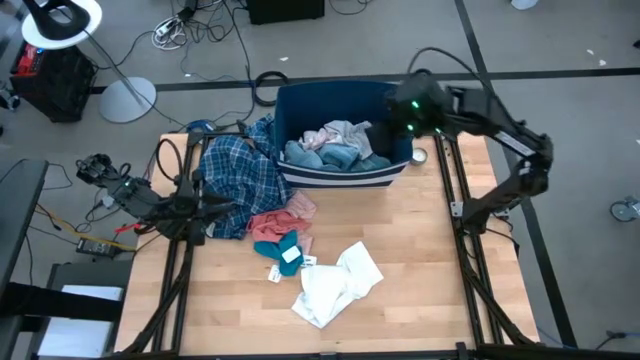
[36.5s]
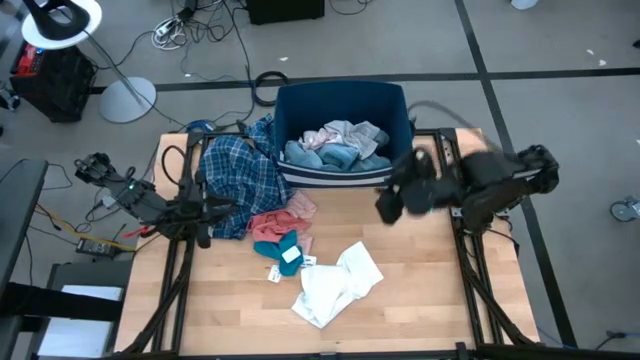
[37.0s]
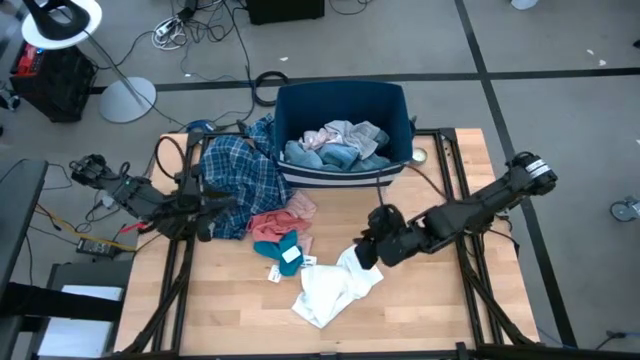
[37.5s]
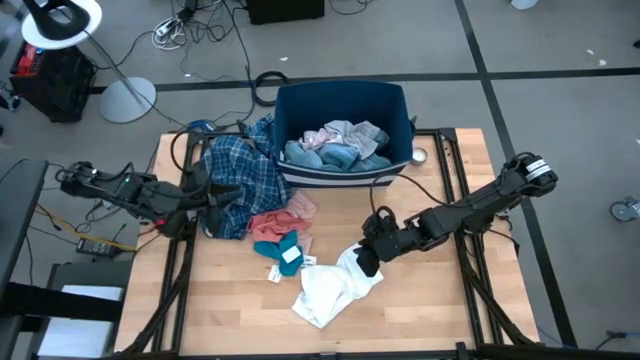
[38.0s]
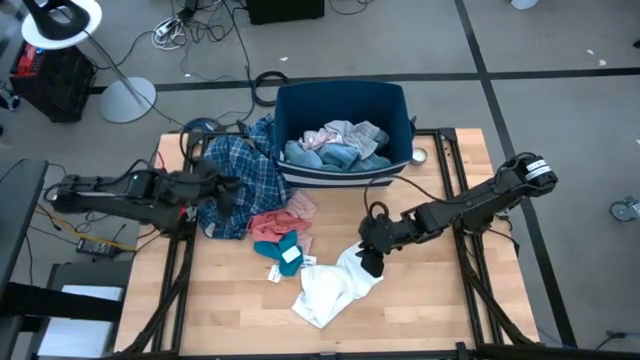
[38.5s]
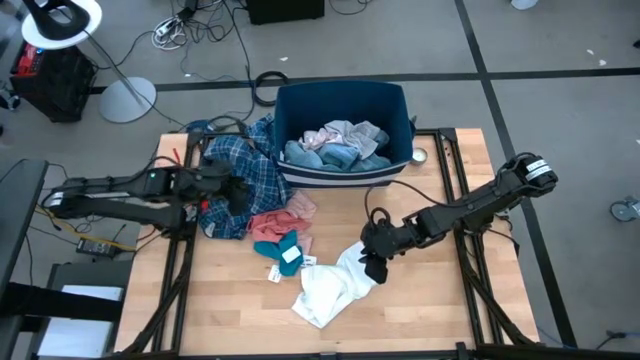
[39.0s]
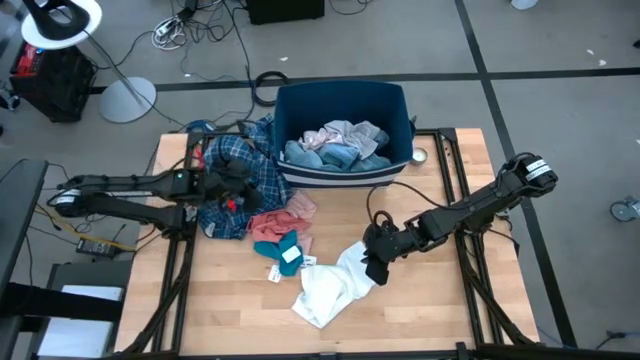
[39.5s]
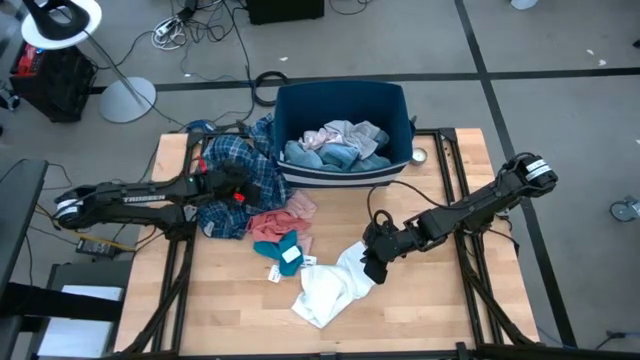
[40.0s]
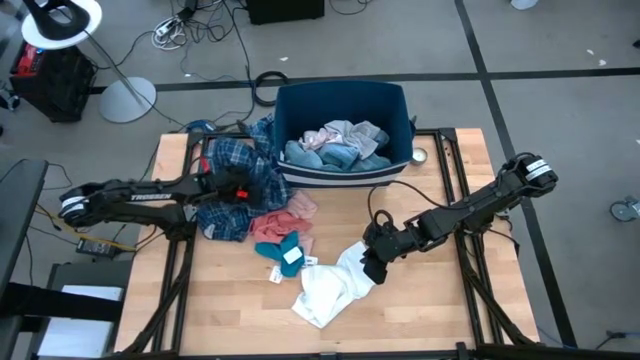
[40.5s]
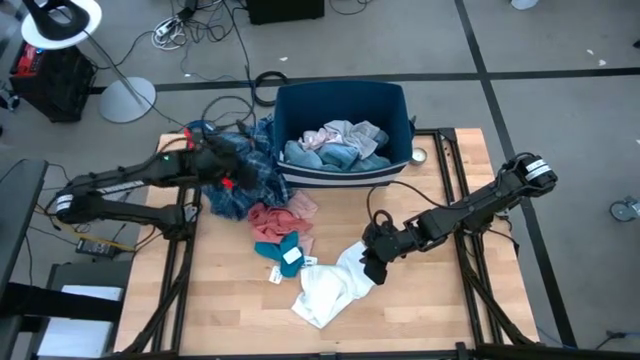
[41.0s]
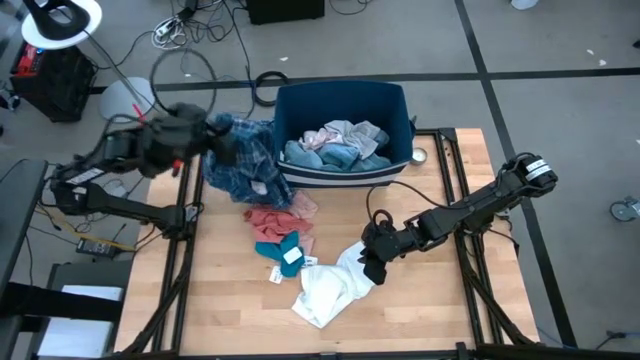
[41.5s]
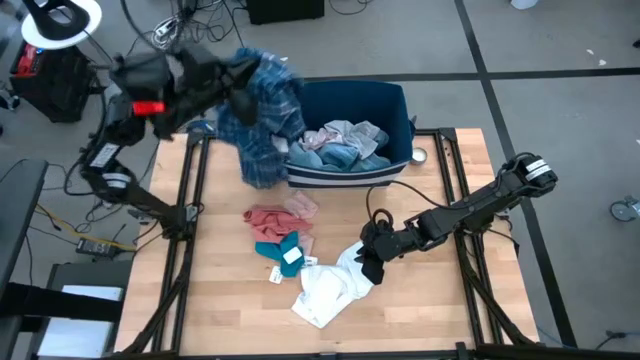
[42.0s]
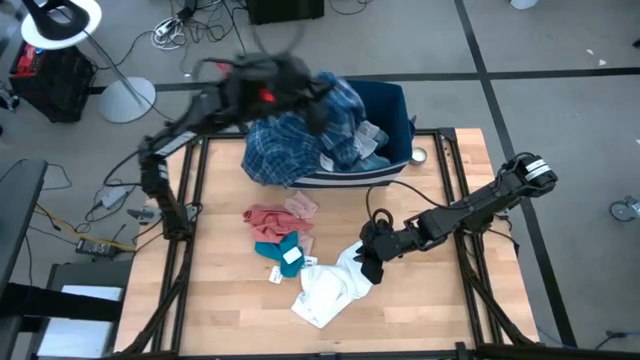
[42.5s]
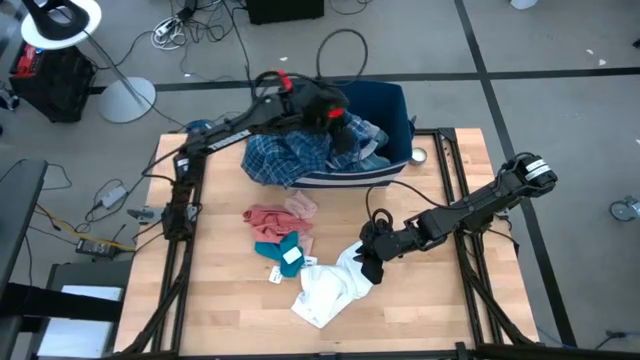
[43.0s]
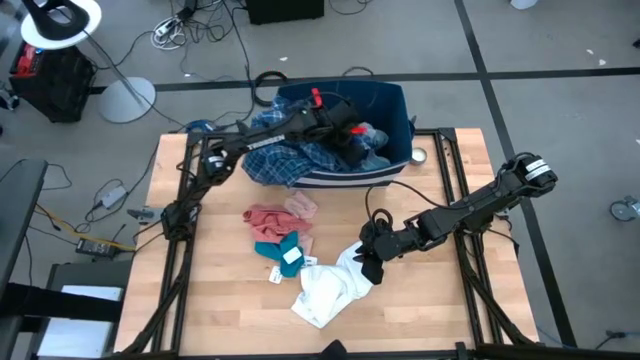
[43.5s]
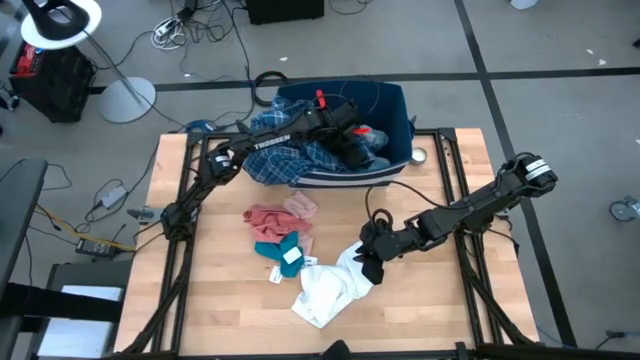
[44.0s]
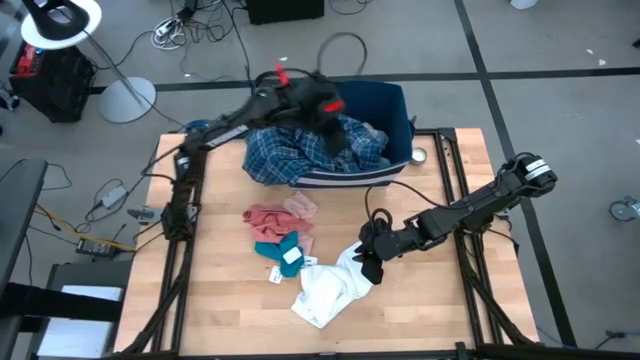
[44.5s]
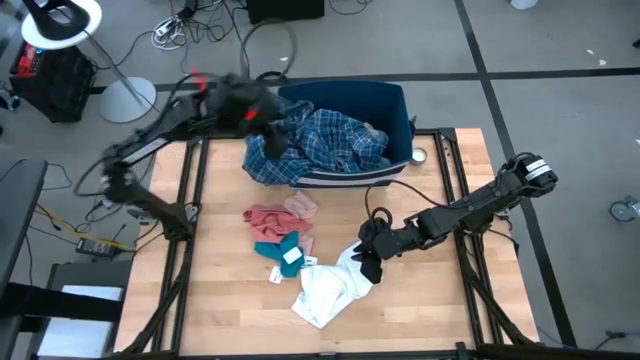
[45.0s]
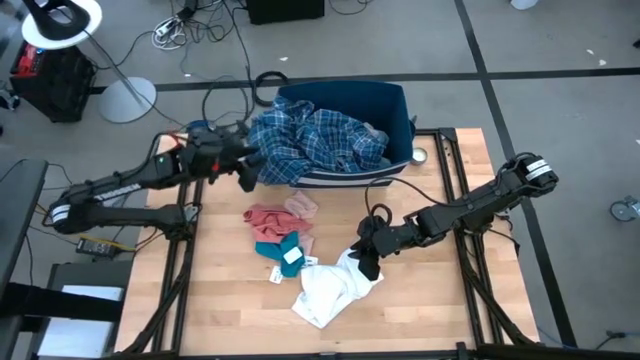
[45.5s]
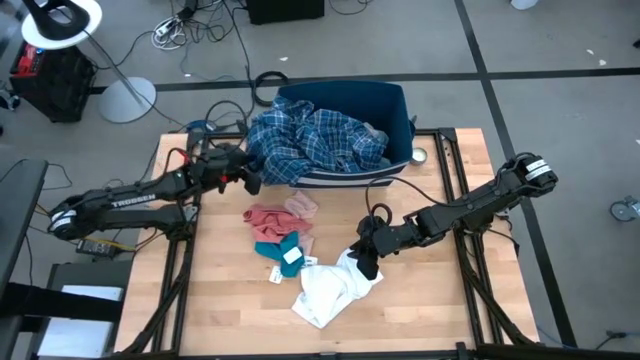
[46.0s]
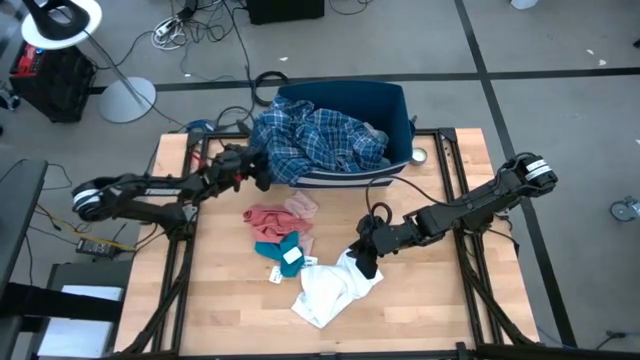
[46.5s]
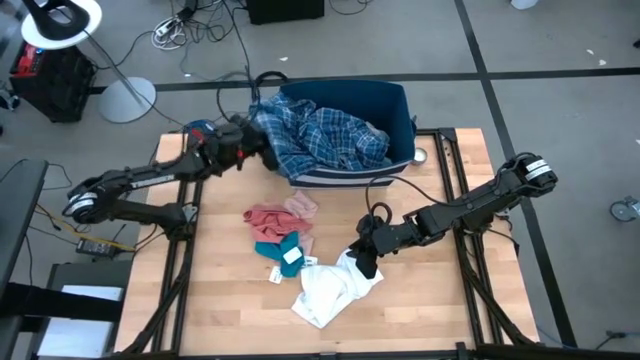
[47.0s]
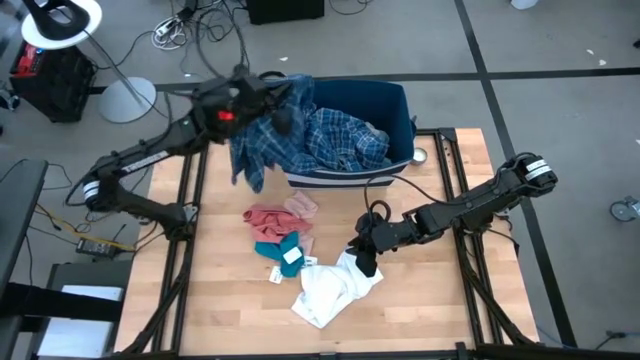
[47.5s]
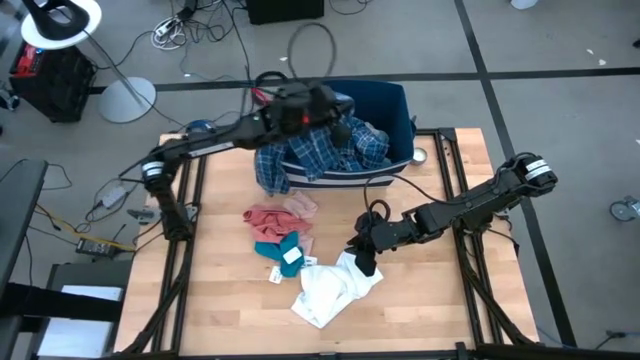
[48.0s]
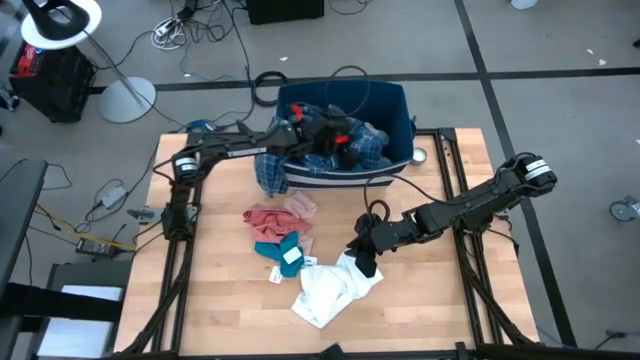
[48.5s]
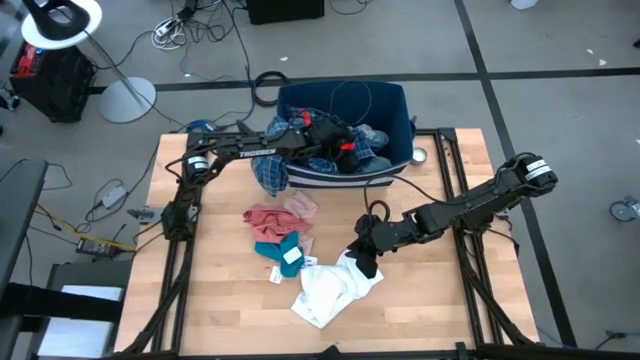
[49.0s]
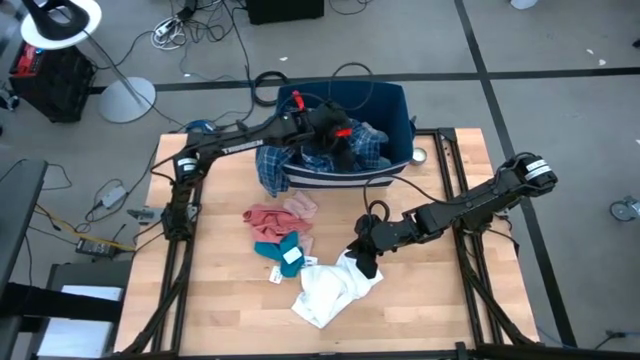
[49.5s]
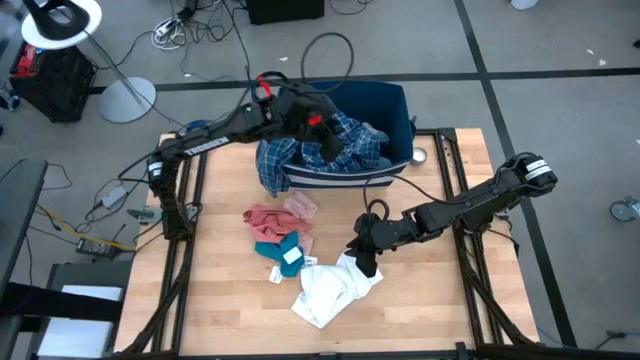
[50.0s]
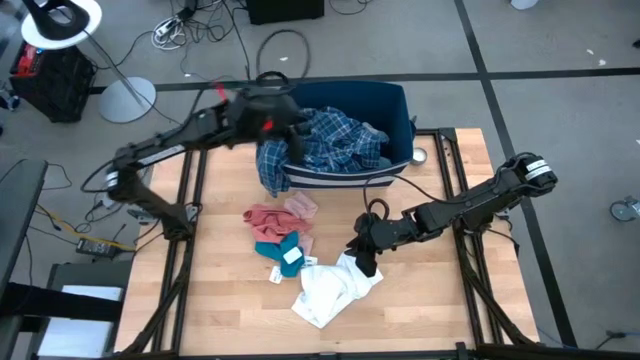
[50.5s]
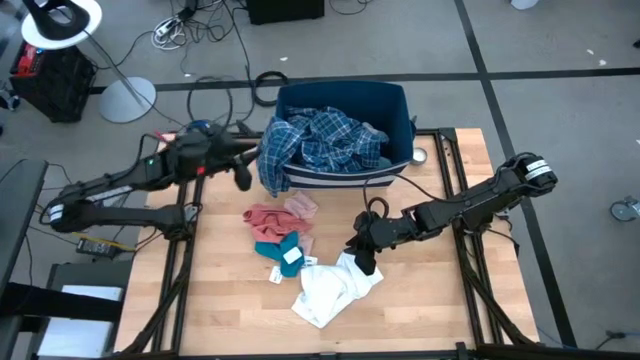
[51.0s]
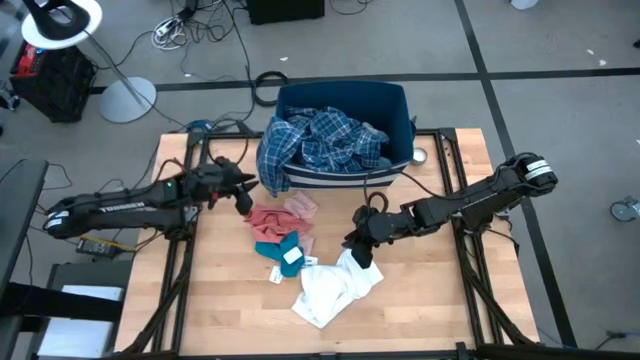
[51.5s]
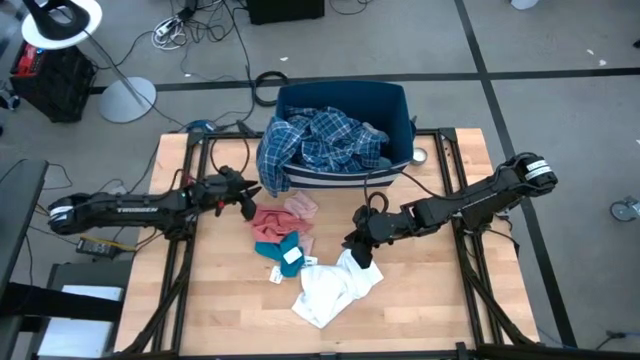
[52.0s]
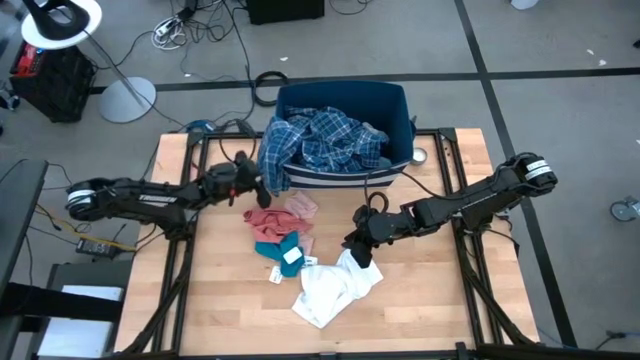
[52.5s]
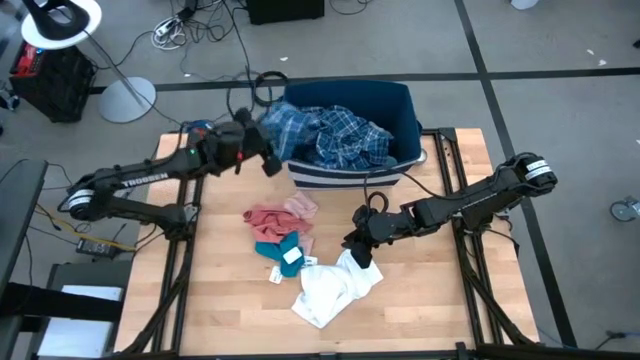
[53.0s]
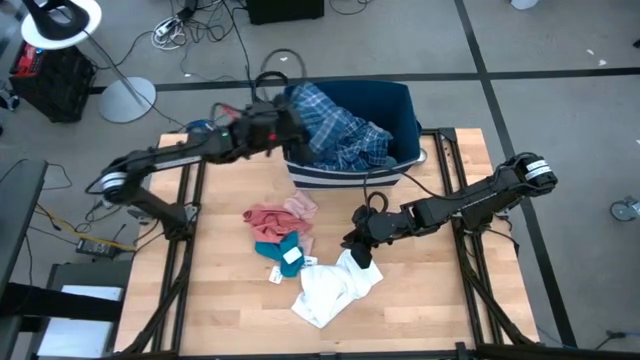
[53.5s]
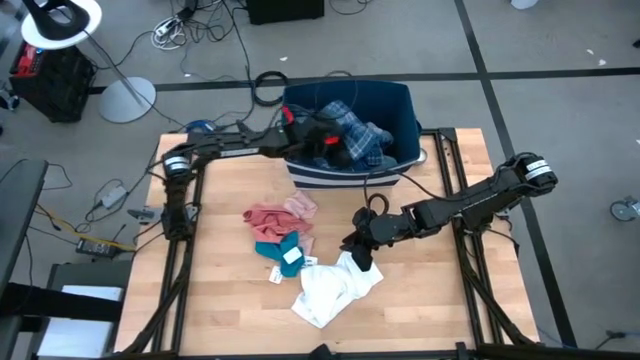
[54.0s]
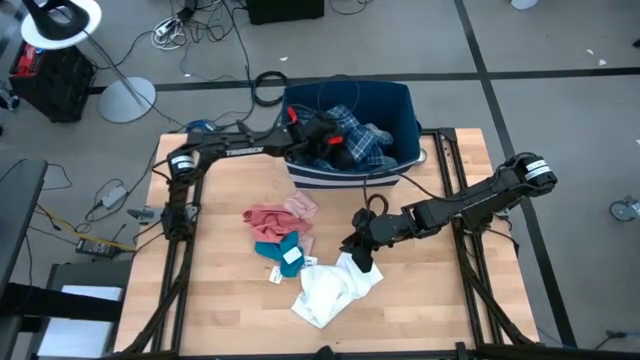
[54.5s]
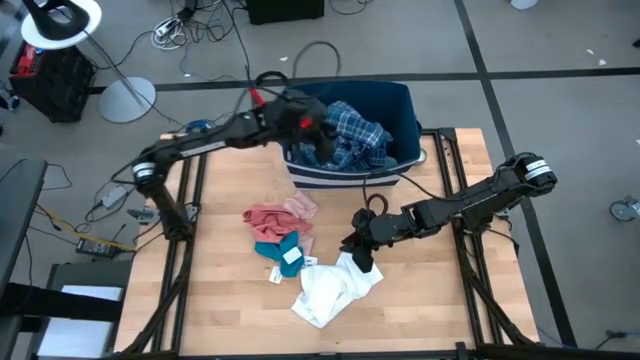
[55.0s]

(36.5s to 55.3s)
Task: Sort clothes
Put the blue polo shirt into the blue bin
